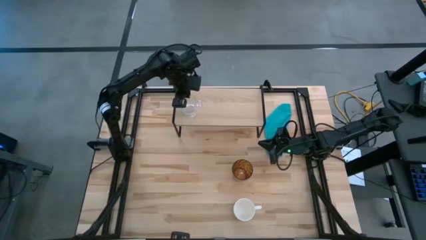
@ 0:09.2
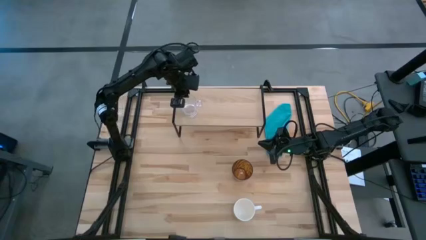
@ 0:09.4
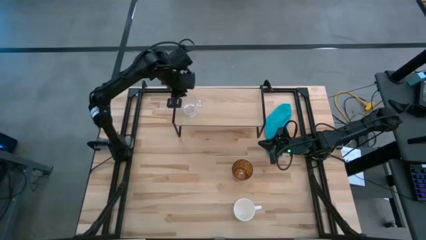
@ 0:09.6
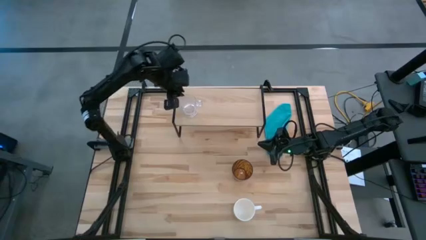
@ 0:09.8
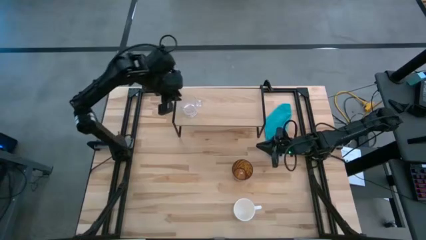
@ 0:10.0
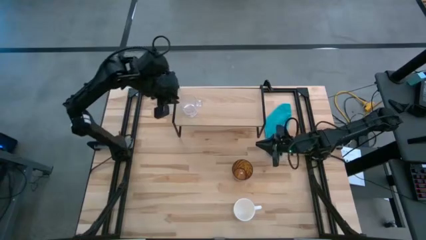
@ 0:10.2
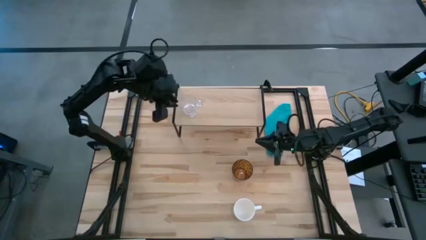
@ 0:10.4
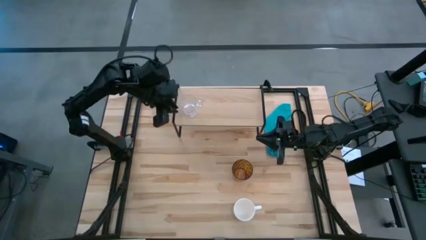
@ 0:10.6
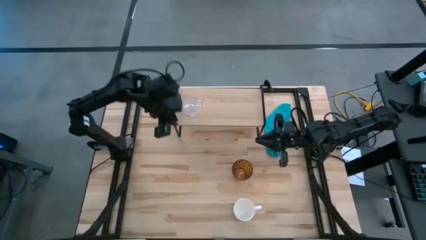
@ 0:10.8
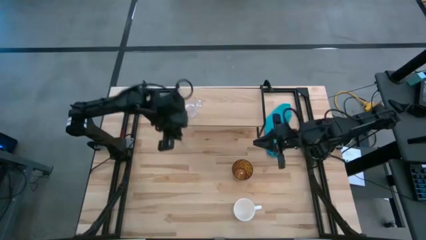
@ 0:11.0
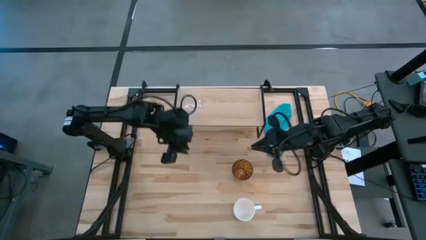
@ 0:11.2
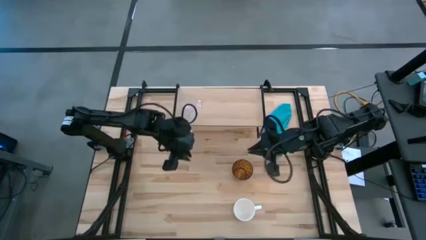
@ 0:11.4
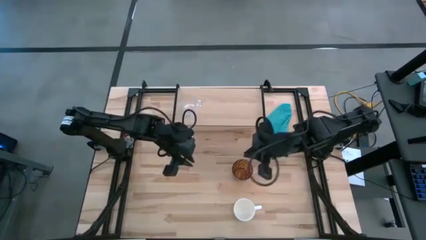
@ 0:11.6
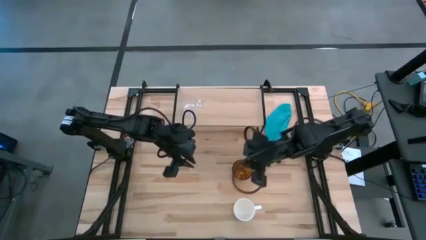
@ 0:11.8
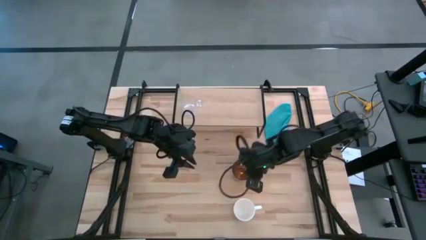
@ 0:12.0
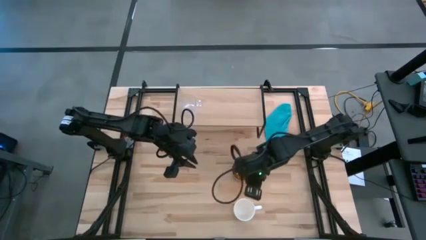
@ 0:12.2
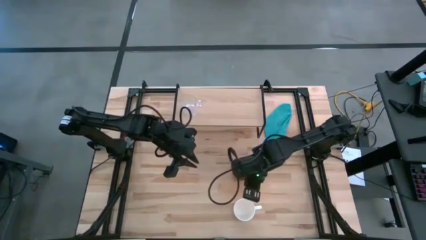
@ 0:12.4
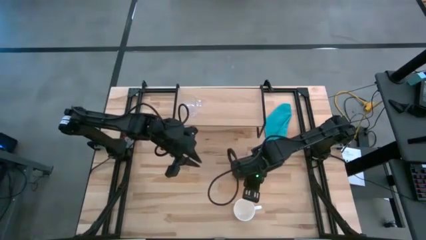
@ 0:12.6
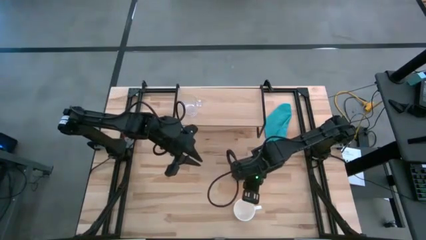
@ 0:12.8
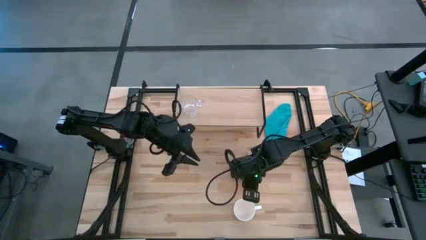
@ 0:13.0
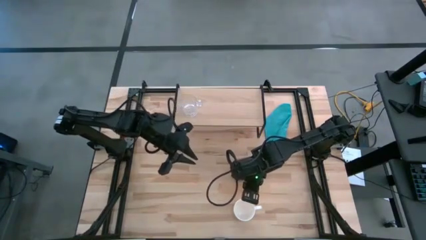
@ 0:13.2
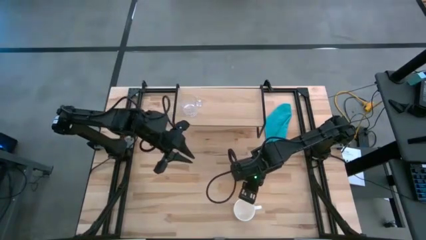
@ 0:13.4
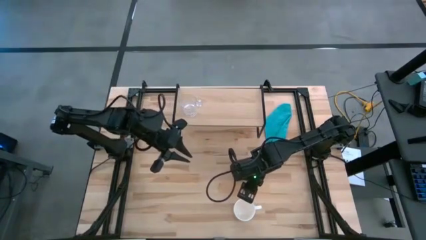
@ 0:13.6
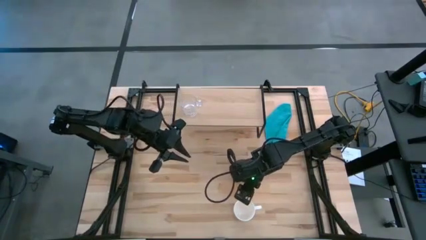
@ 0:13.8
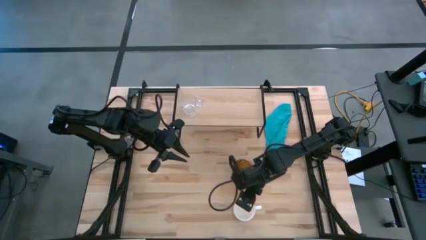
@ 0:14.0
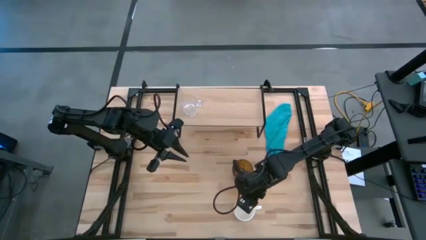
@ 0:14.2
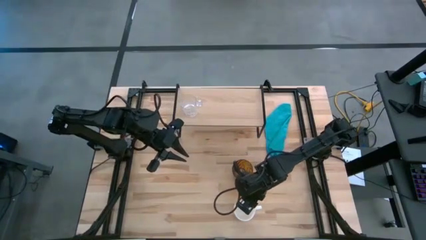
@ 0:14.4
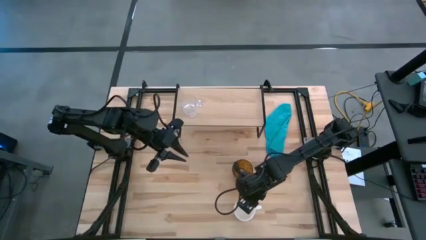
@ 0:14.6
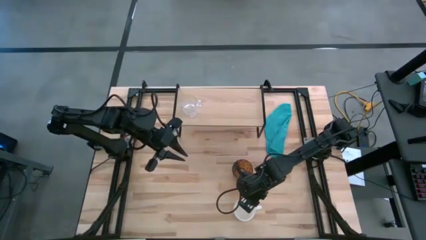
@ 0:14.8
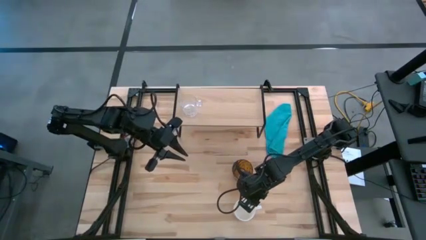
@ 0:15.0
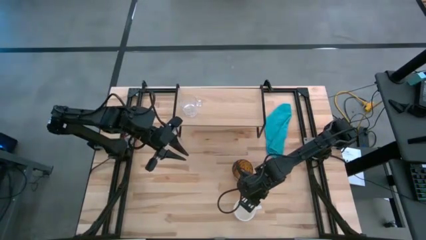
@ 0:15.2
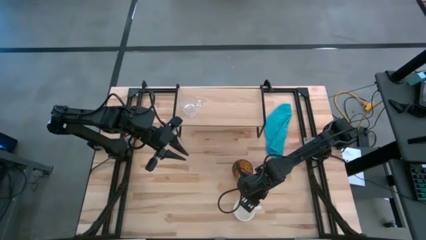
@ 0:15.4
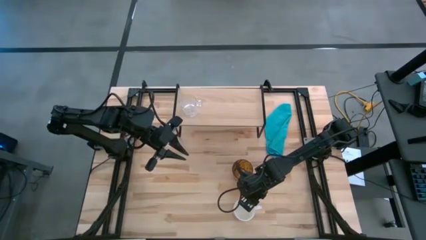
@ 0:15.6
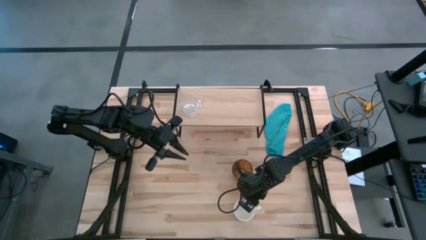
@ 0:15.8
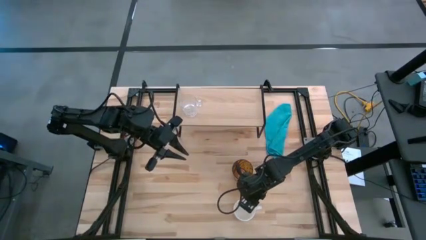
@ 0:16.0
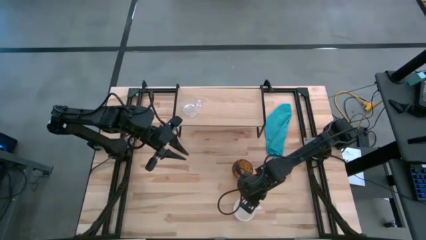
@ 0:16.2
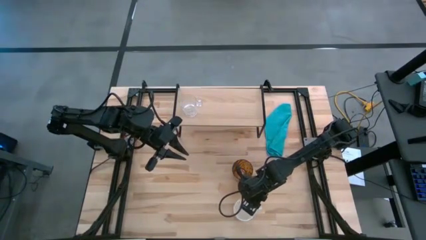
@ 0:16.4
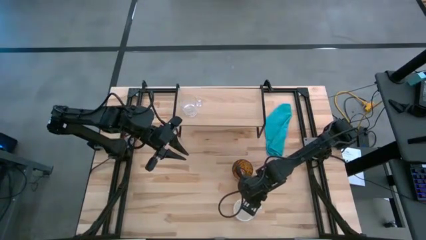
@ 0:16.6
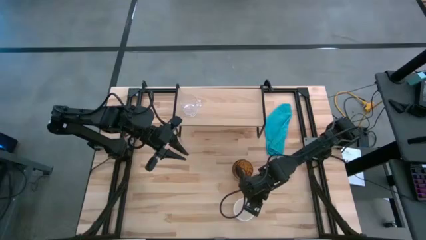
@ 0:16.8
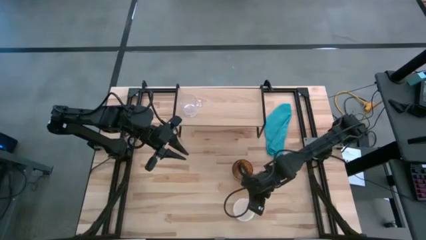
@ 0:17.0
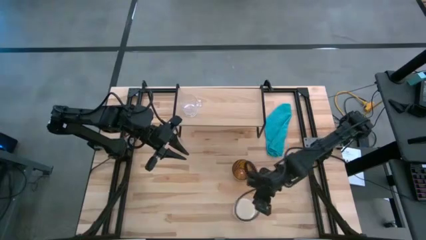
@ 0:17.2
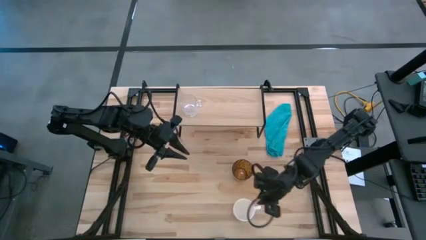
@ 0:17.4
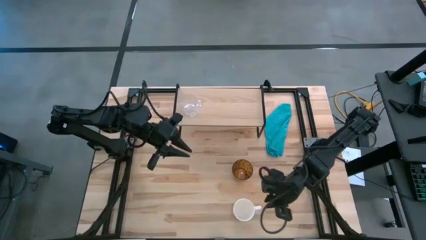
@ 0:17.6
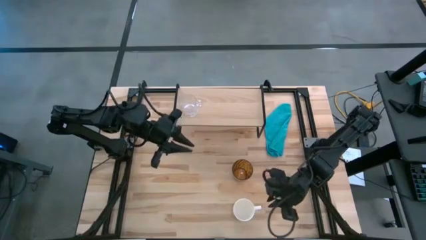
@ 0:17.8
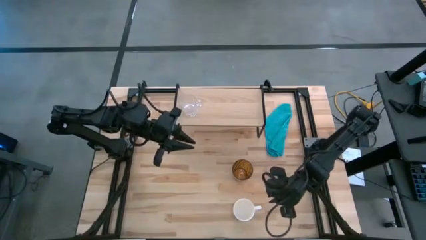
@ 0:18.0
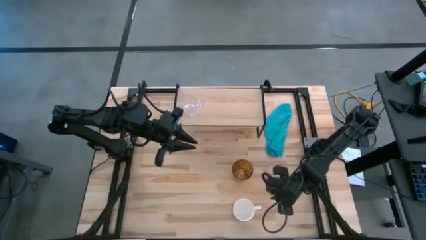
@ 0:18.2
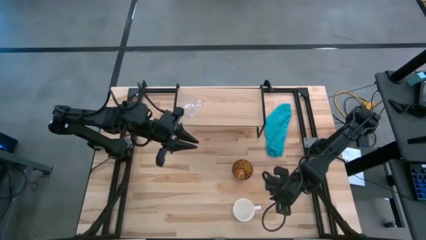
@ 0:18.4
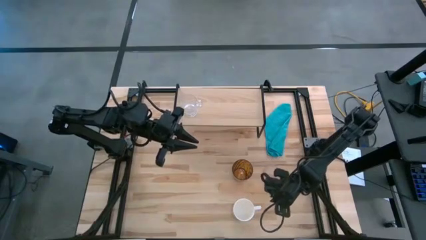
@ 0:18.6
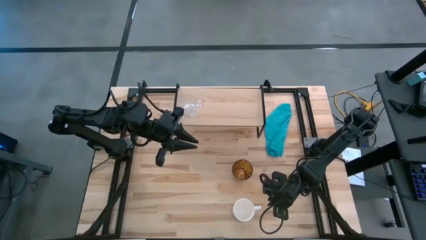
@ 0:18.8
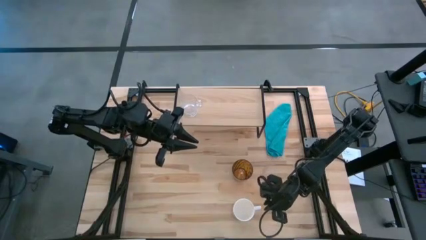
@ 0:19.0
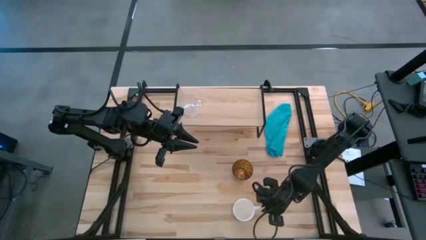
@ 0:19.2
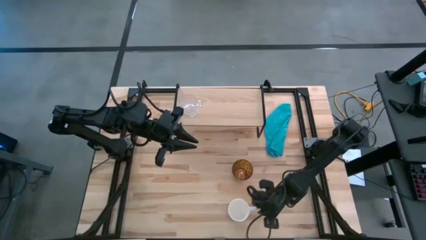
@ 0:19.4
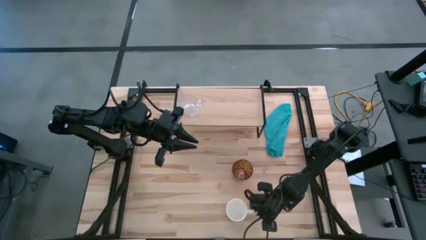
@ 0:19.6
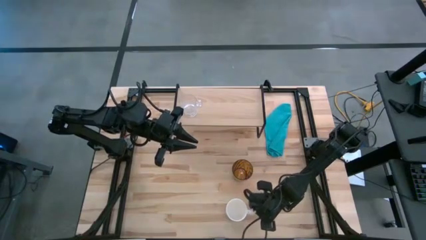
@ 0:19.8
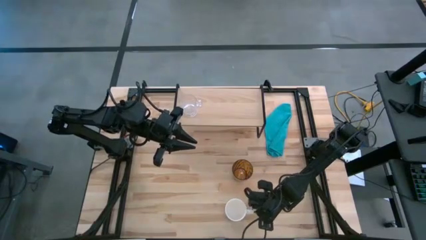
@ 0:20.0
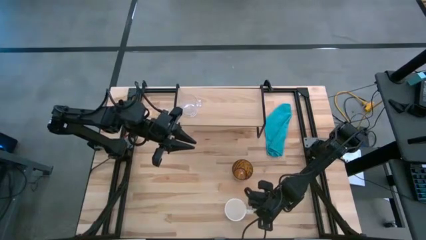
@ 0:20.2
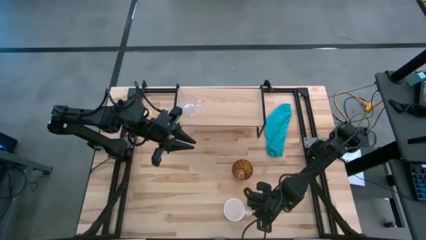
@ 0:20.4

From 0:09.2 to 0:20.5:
Task: Stack small to large cups/mugs on shelf
Put the white mug on the shelf
